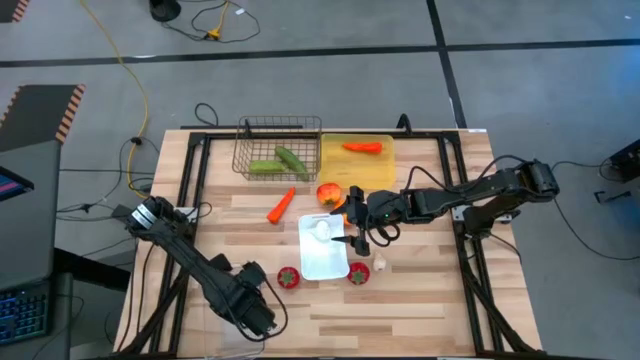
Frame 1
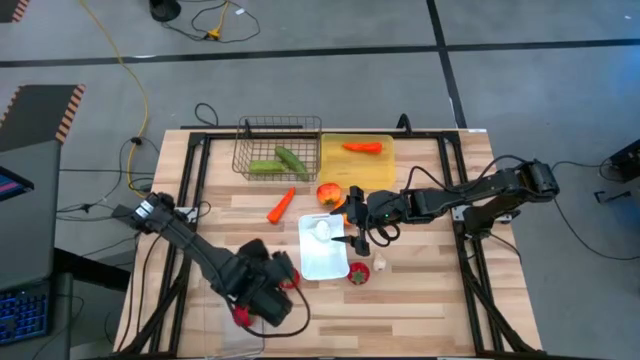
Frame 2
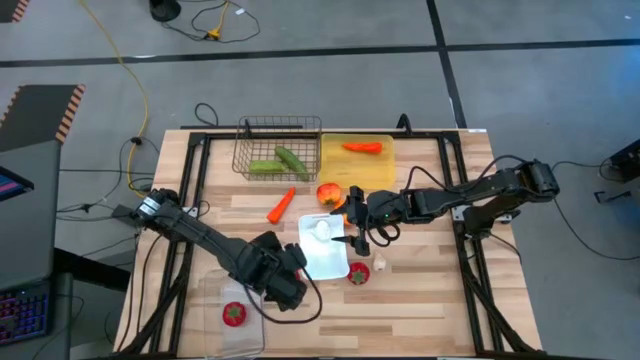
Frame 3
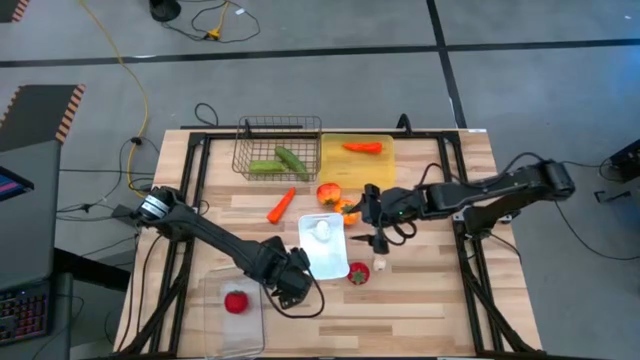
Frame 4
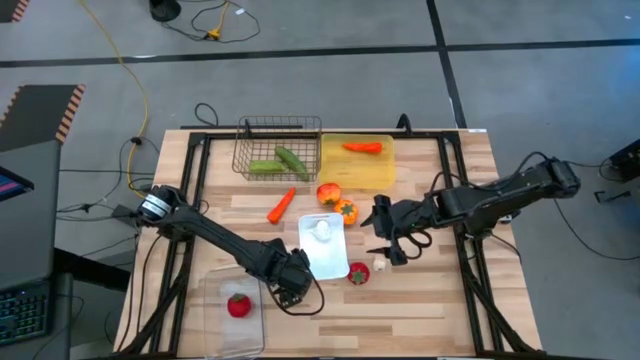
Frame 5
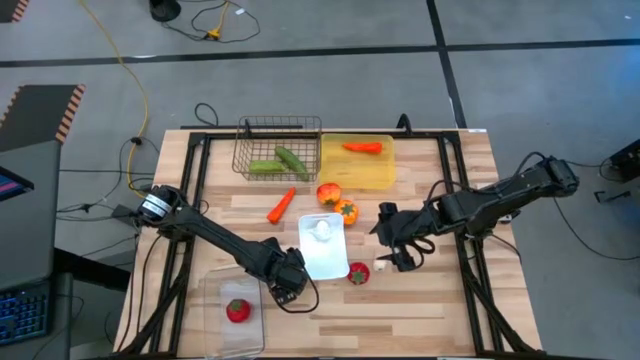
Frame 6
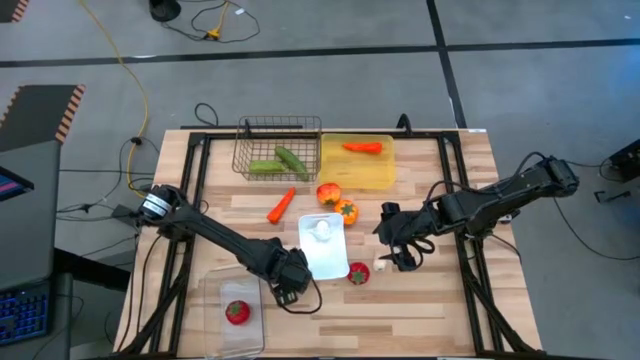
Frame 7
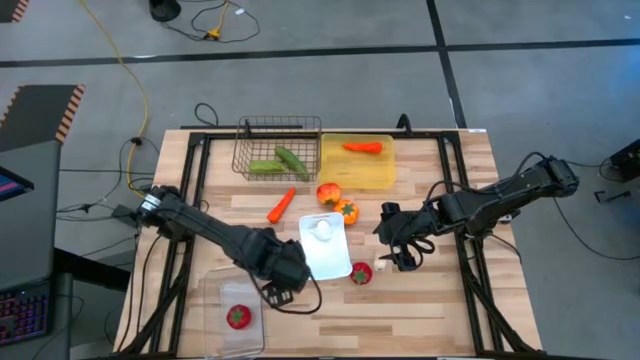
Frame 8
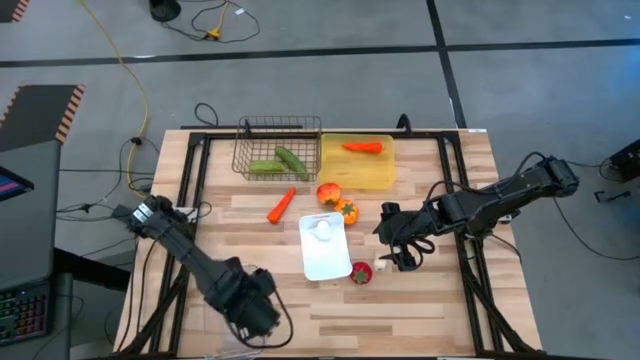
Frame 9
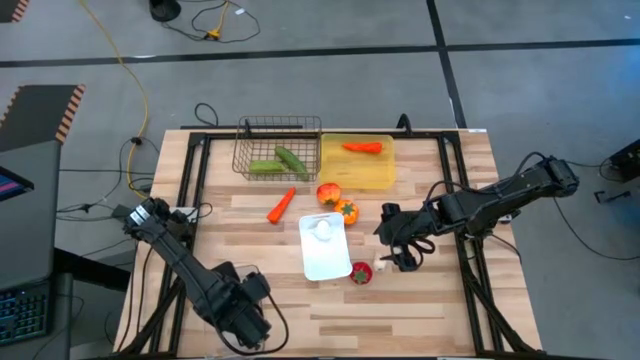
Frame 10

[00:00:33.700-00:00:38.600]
Task: Sort produce into baskets
Put the left red tomato into the transparent bin

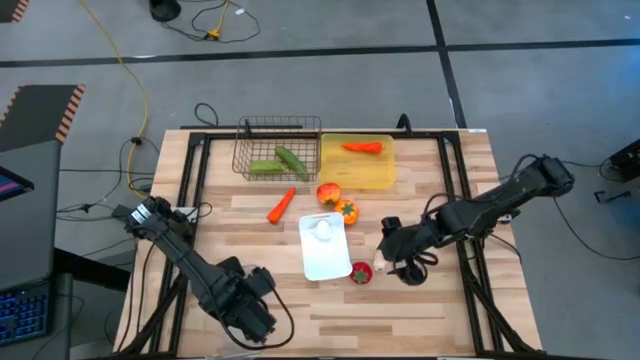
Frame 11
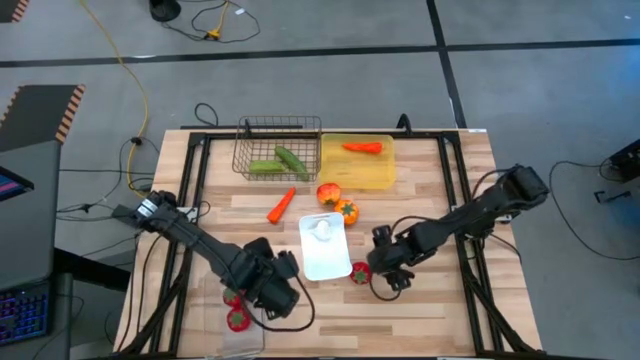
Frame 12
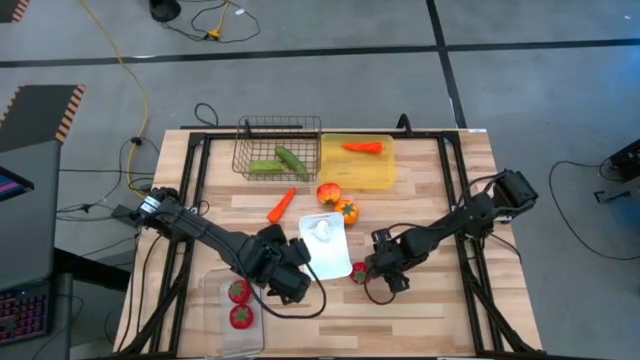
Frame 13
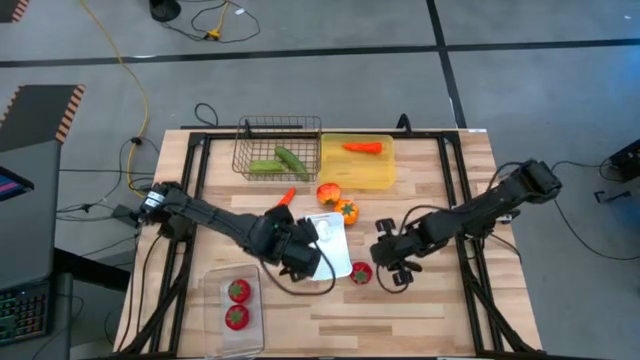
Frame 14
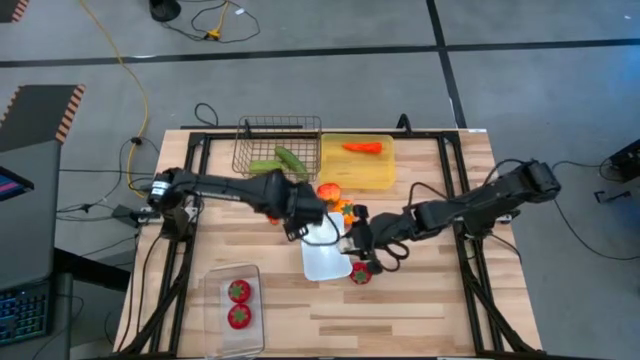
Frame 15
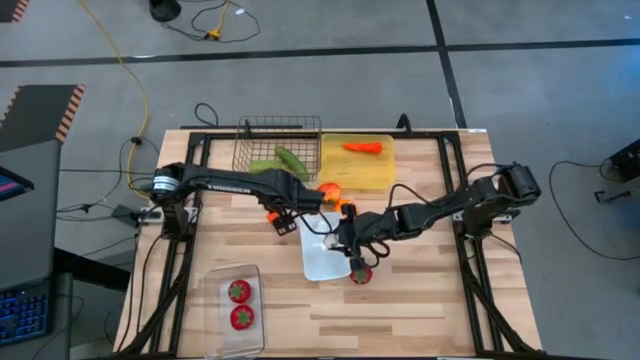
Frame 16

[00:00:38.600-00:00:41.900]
Put the garlic into the white bin

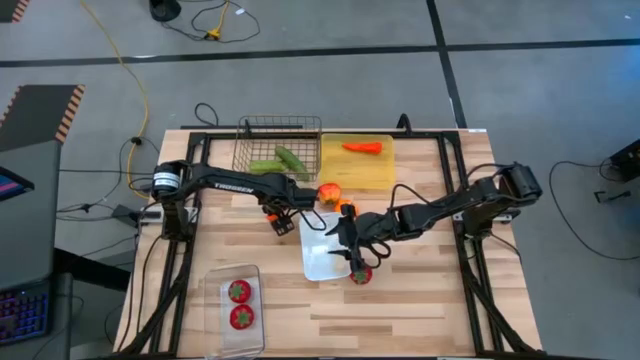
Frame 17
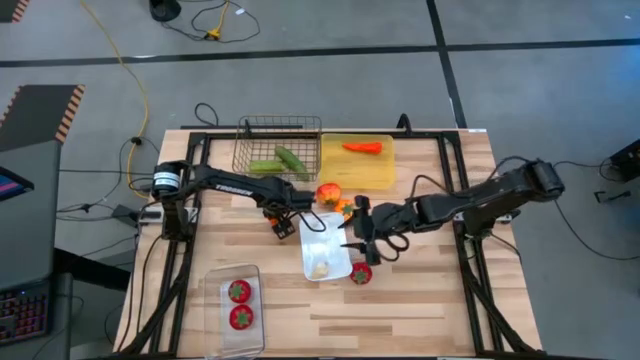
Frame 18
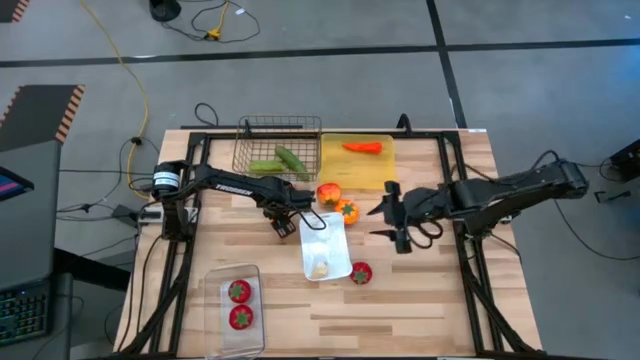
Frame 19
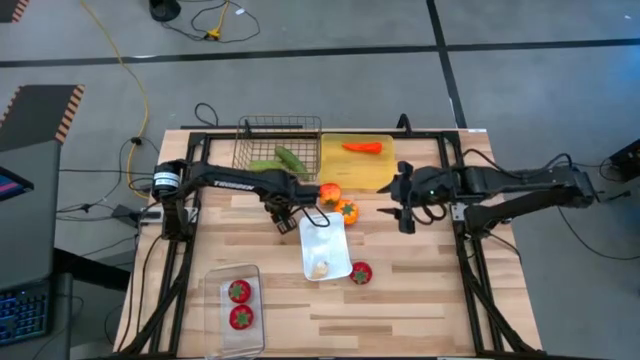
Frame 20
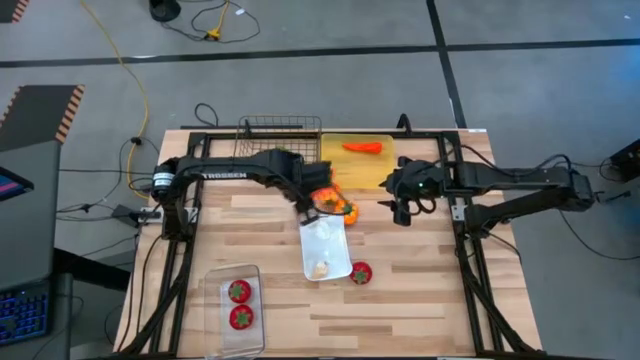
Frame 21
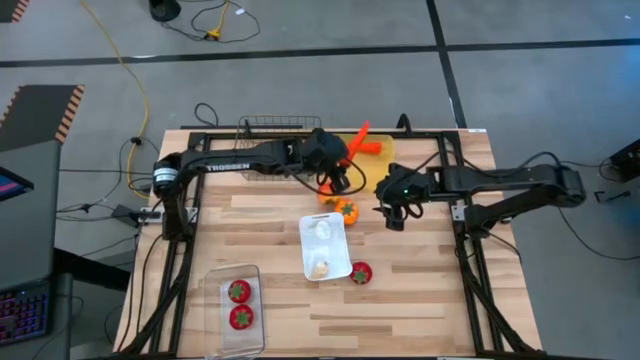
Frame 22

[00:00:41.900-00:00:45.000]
Put the carrot into the yellow bin

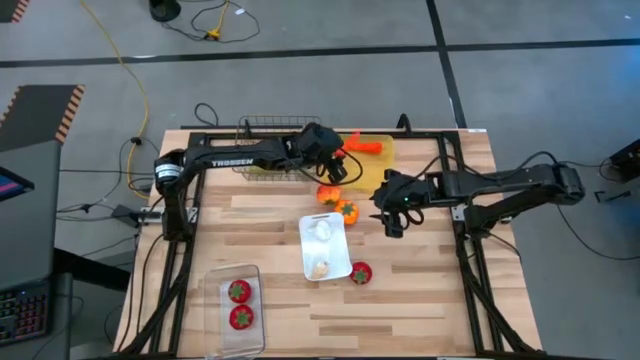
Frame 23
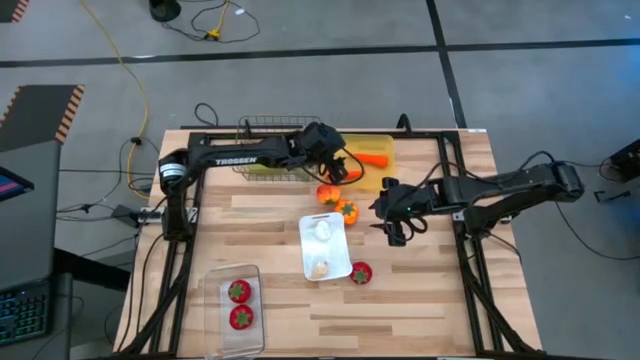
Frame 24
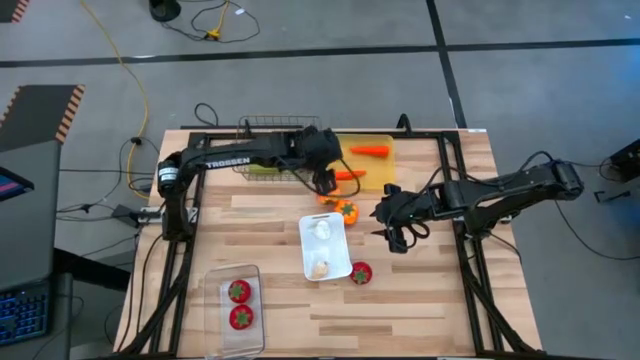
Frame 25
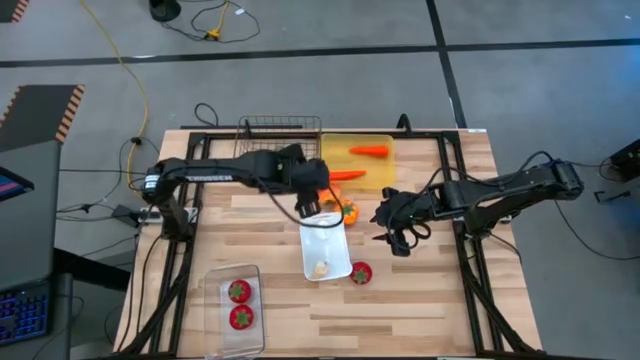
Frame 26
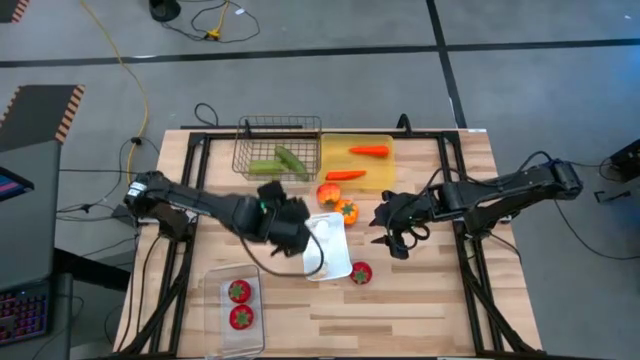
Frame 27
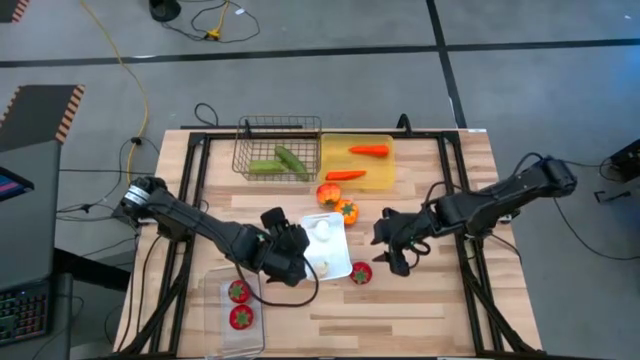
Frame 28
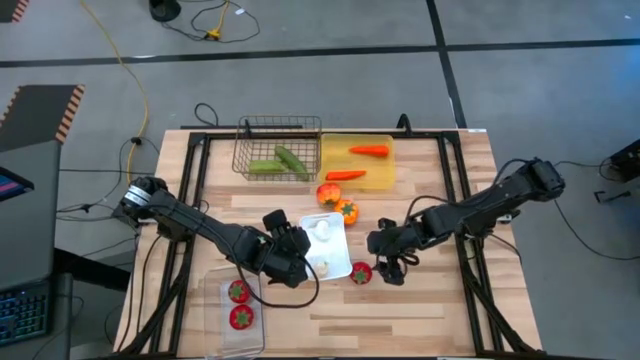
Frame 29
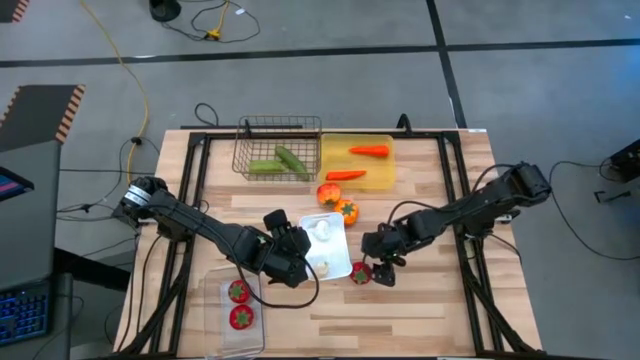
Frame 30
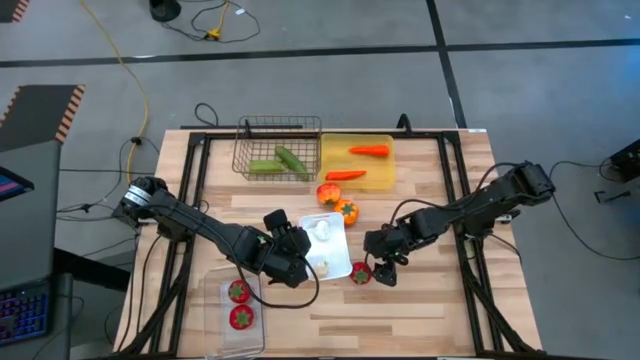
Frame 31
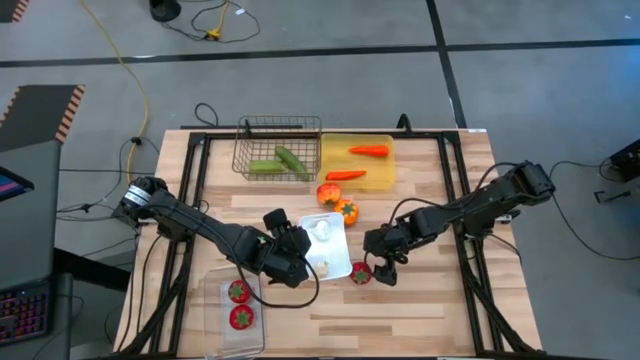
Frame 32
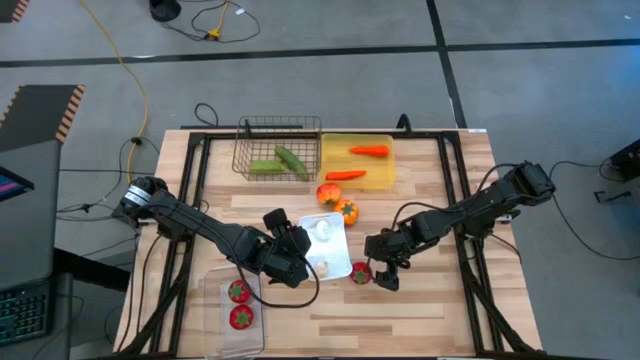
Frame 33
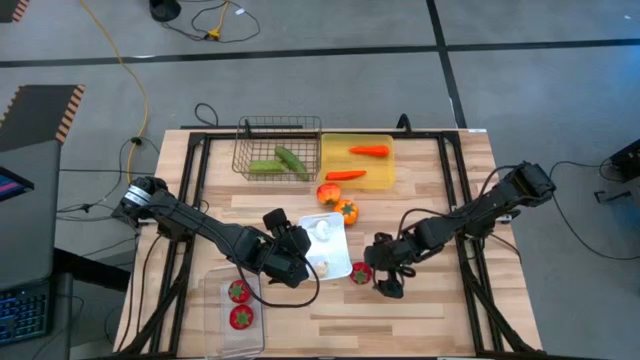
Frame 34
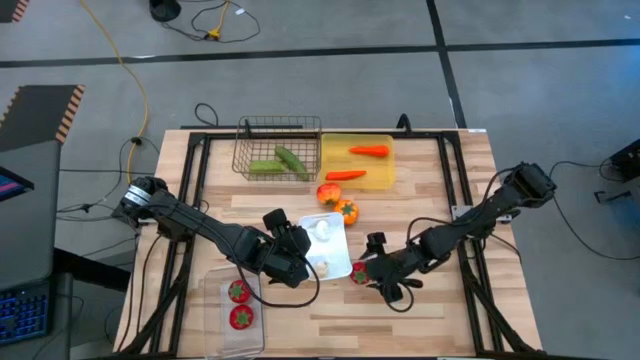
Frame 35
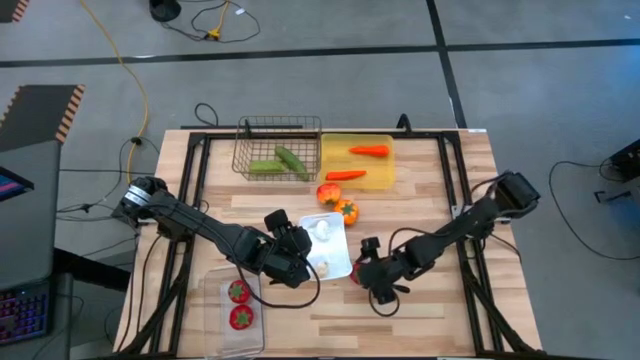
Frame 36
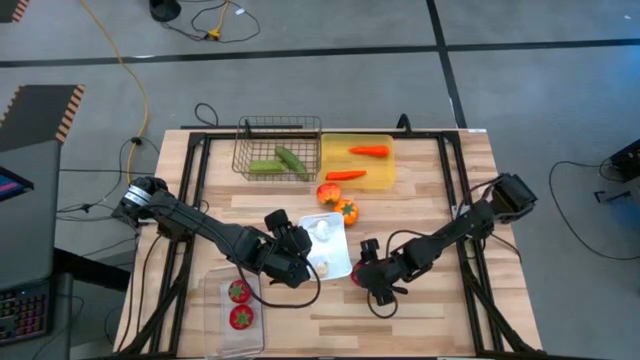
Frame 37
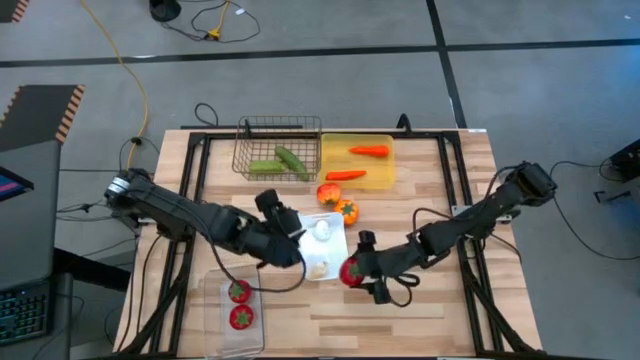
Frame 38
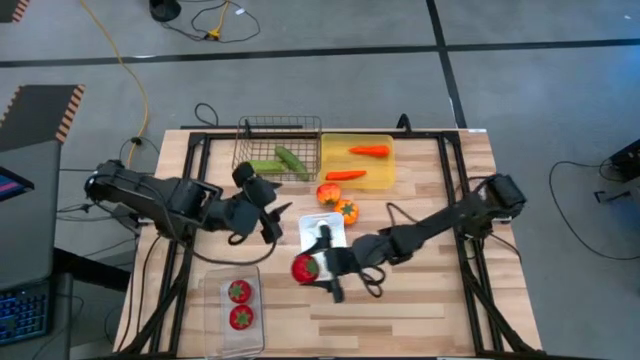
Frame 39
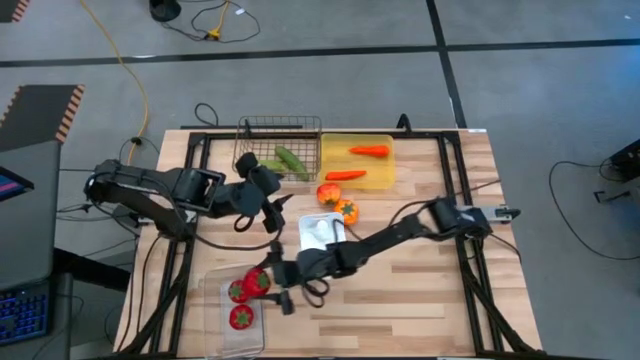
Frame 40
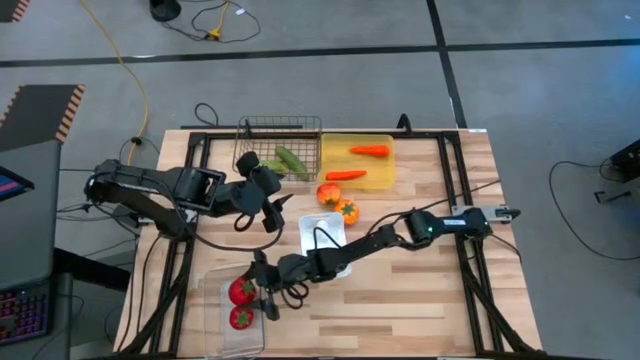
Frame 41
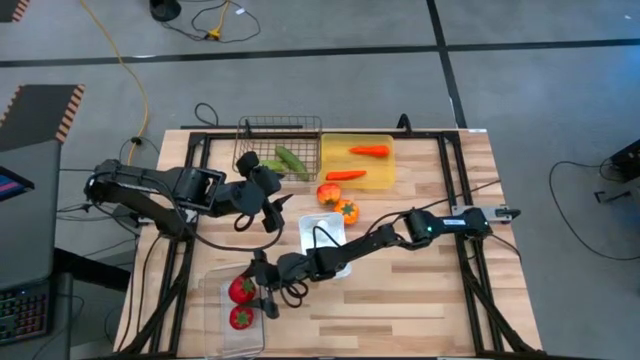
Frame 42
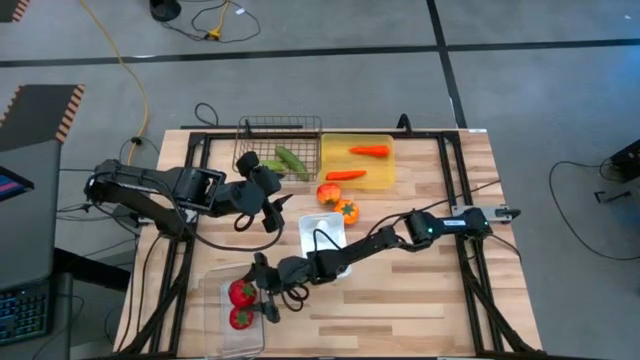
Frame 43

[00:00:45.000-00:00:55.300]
Put the red tomato into the transparent bin
